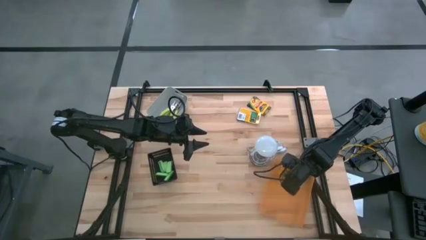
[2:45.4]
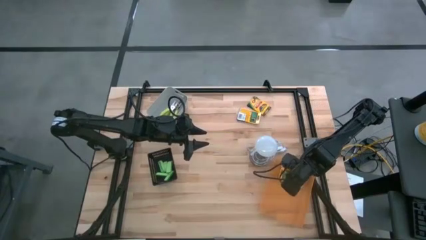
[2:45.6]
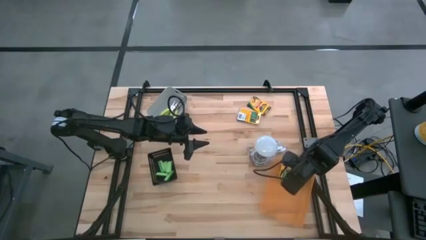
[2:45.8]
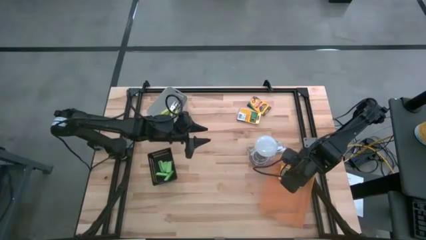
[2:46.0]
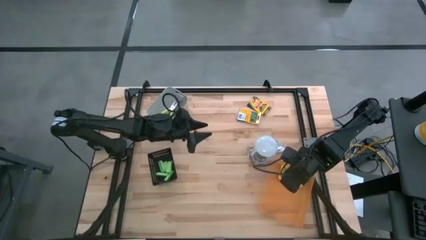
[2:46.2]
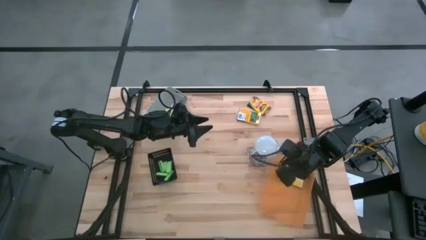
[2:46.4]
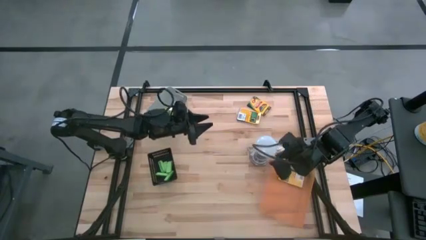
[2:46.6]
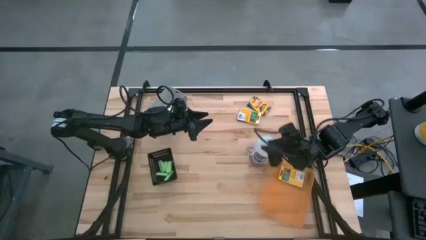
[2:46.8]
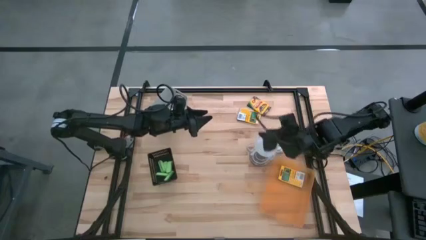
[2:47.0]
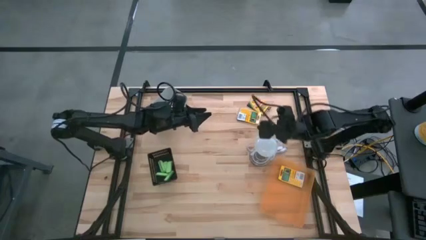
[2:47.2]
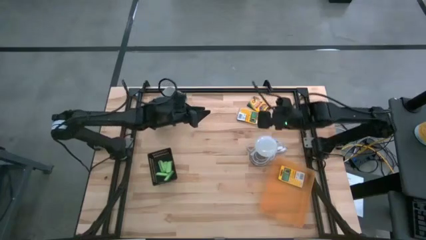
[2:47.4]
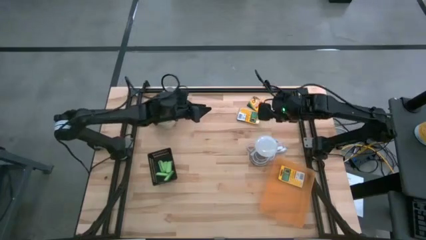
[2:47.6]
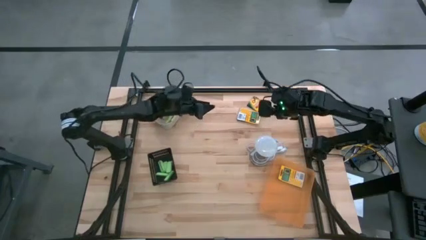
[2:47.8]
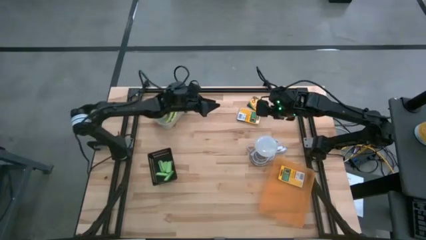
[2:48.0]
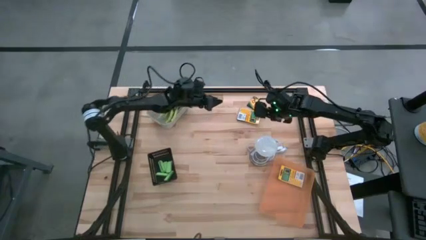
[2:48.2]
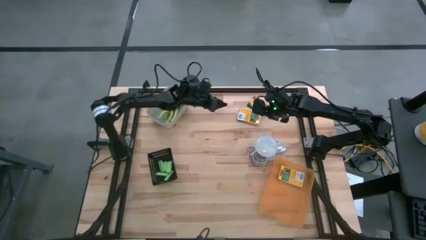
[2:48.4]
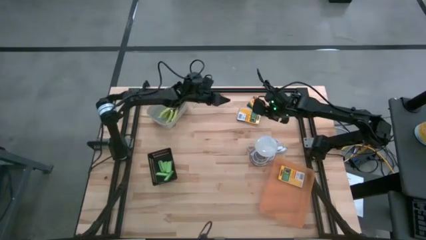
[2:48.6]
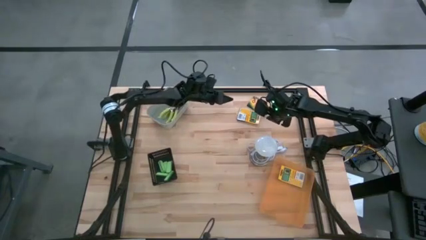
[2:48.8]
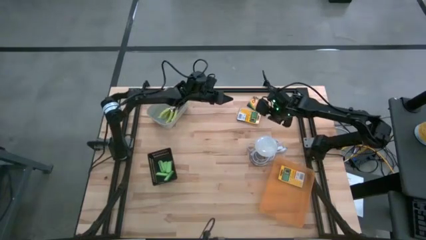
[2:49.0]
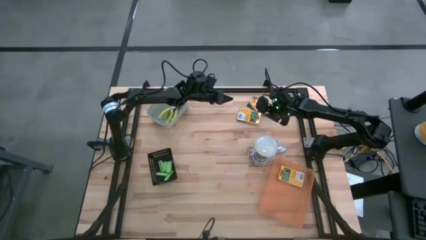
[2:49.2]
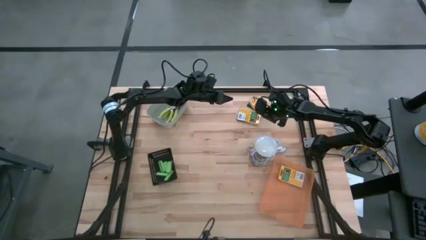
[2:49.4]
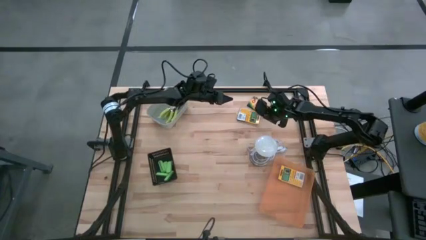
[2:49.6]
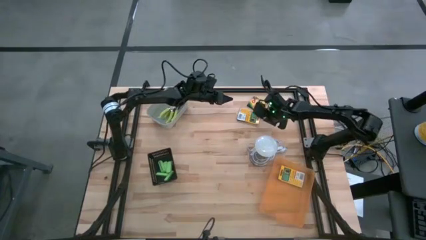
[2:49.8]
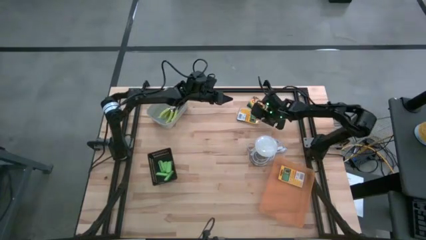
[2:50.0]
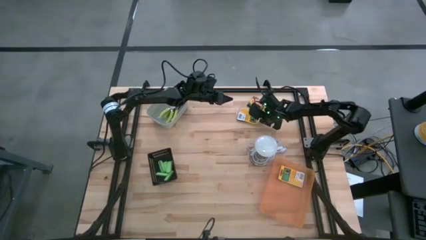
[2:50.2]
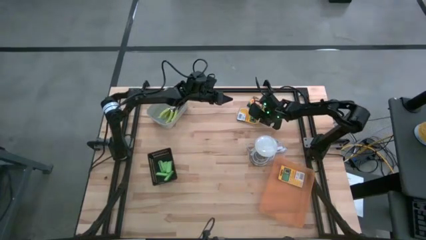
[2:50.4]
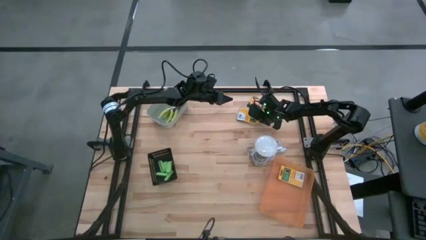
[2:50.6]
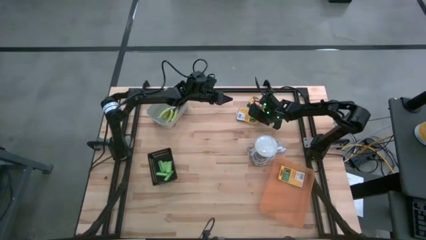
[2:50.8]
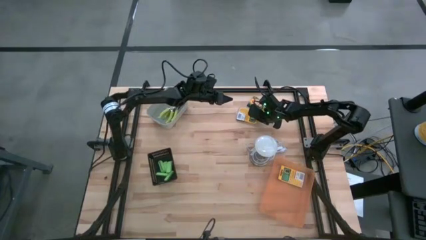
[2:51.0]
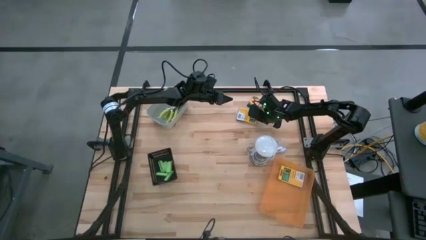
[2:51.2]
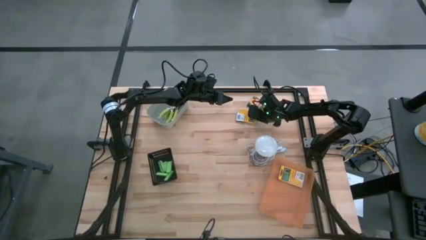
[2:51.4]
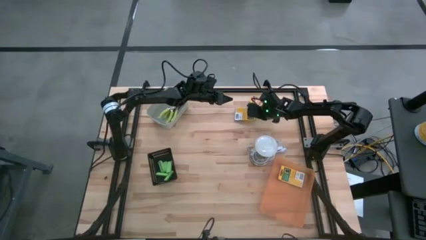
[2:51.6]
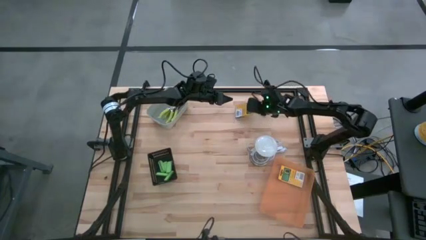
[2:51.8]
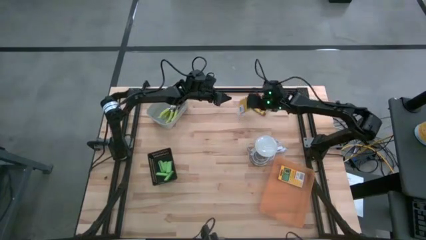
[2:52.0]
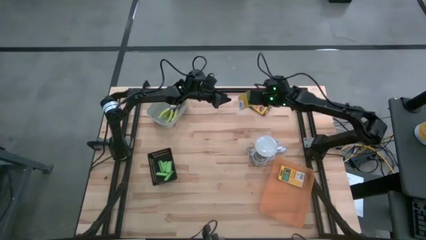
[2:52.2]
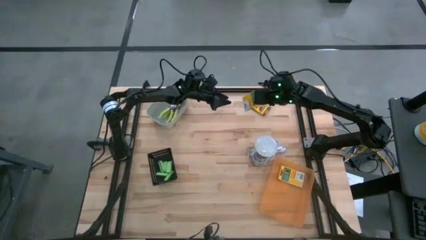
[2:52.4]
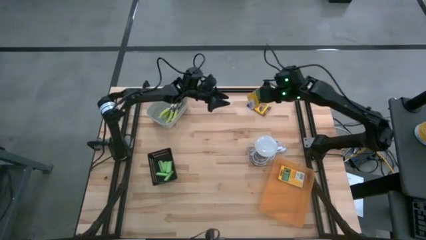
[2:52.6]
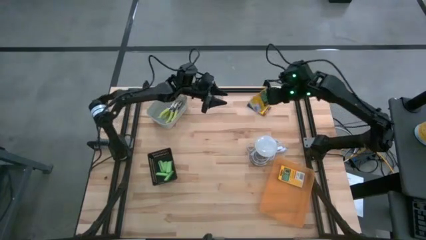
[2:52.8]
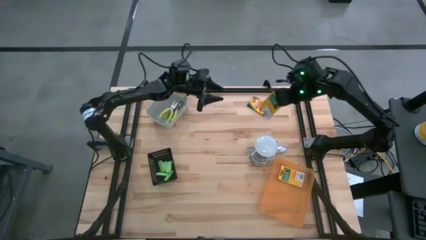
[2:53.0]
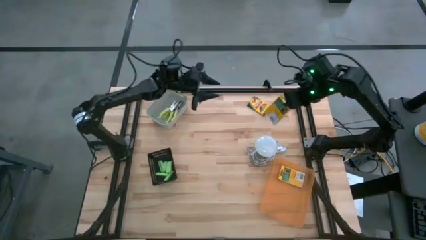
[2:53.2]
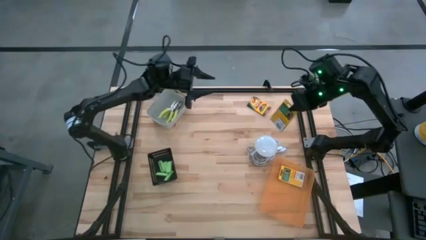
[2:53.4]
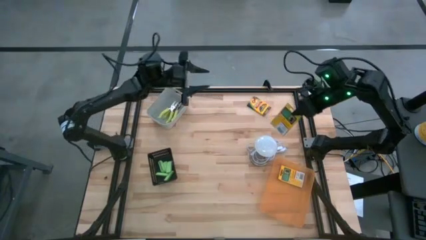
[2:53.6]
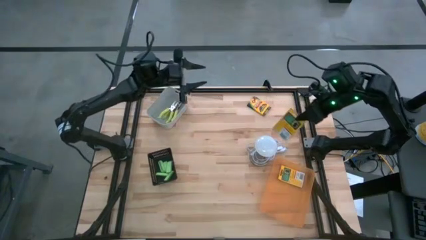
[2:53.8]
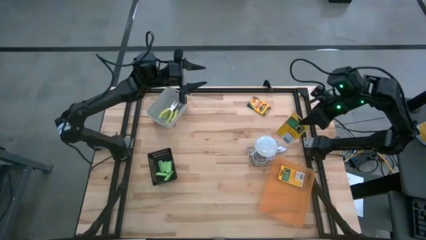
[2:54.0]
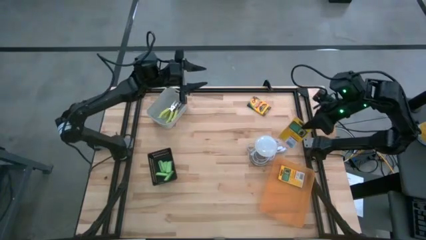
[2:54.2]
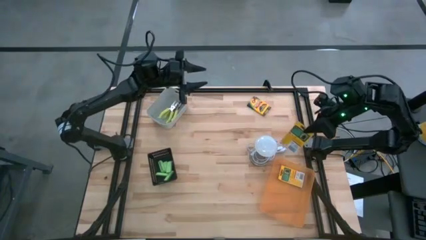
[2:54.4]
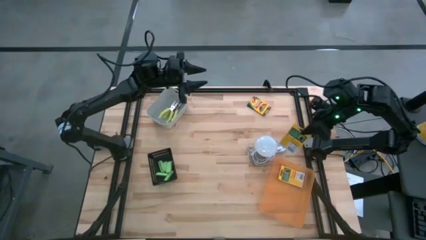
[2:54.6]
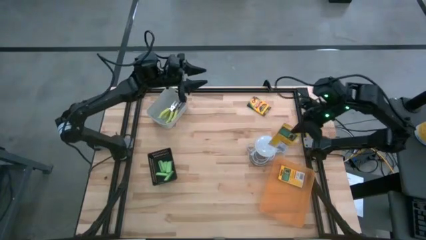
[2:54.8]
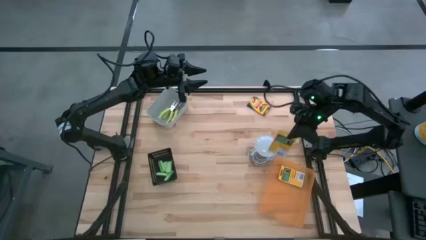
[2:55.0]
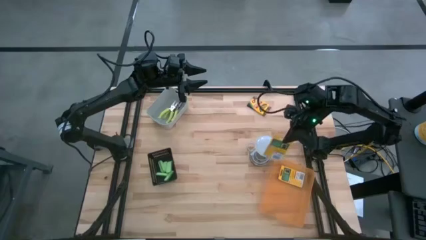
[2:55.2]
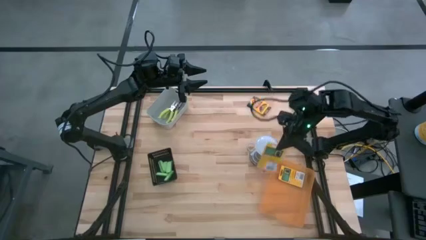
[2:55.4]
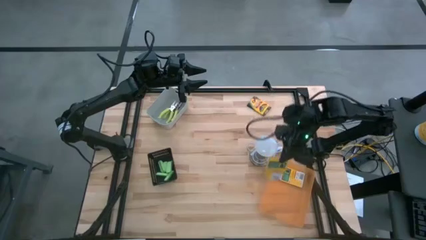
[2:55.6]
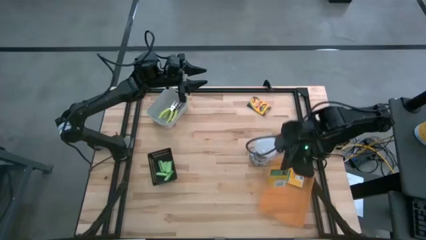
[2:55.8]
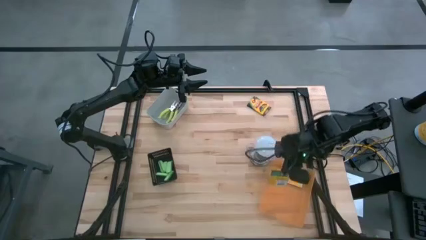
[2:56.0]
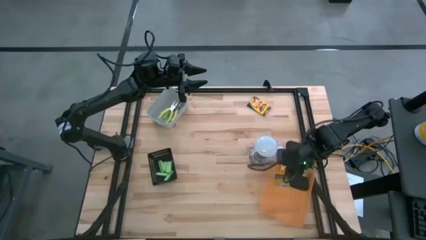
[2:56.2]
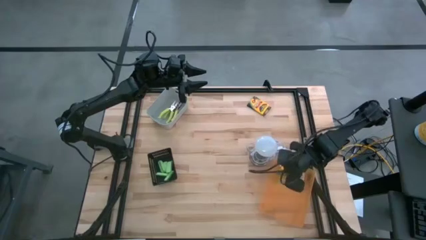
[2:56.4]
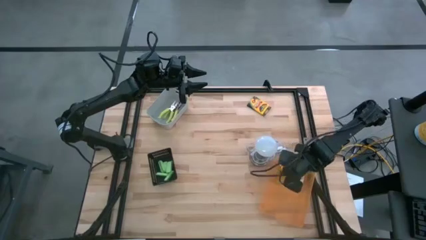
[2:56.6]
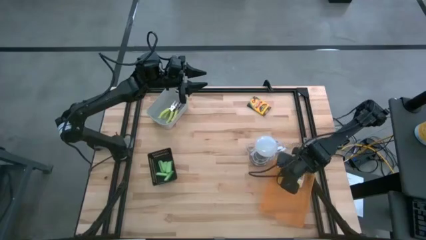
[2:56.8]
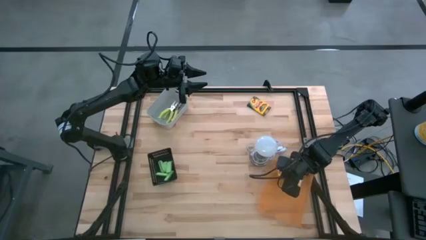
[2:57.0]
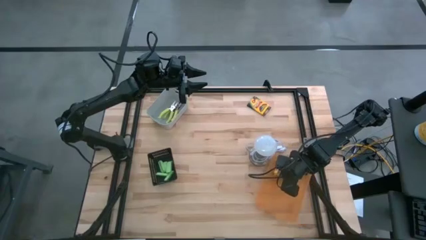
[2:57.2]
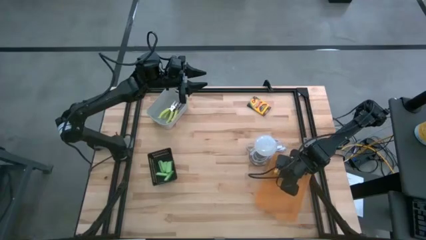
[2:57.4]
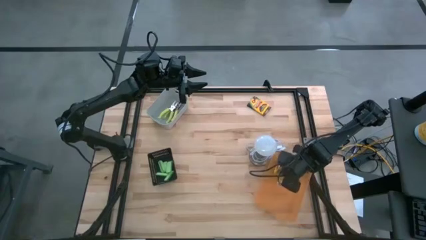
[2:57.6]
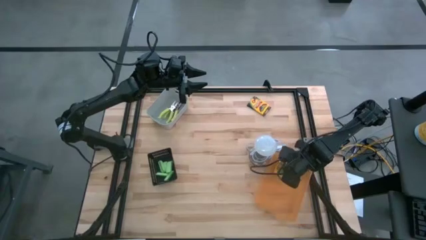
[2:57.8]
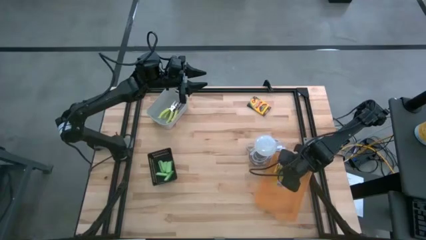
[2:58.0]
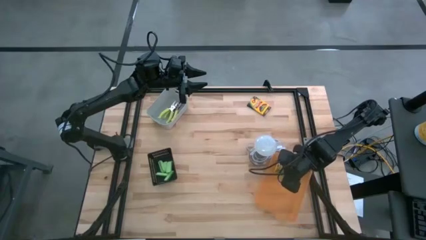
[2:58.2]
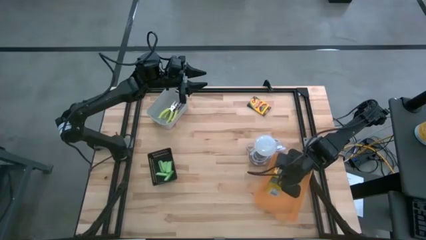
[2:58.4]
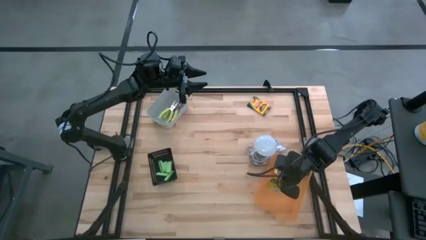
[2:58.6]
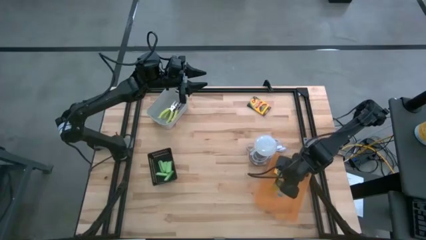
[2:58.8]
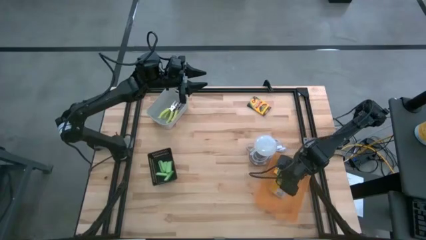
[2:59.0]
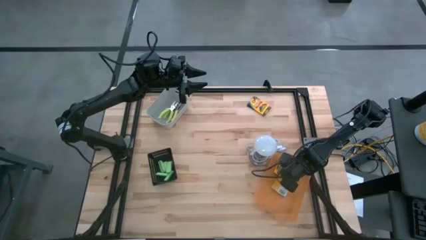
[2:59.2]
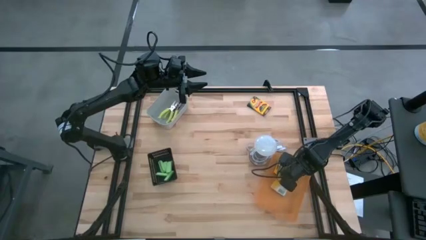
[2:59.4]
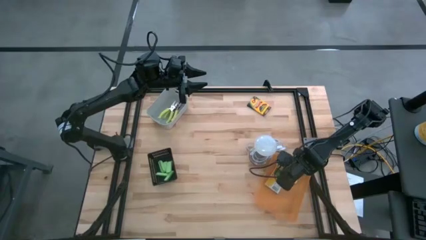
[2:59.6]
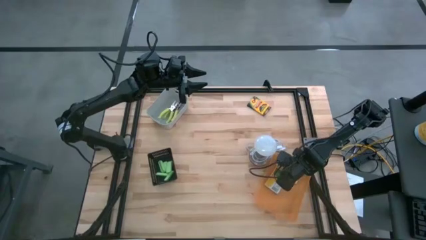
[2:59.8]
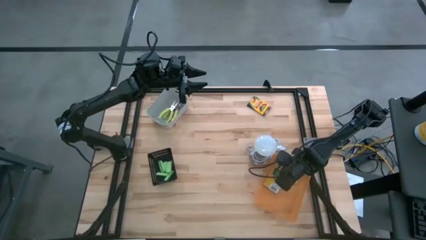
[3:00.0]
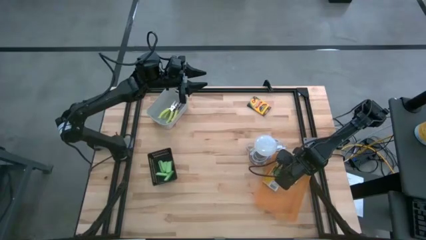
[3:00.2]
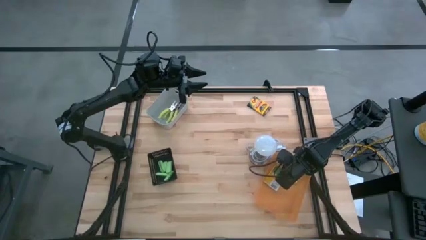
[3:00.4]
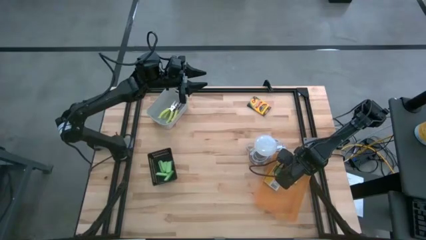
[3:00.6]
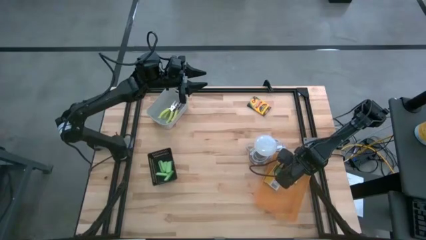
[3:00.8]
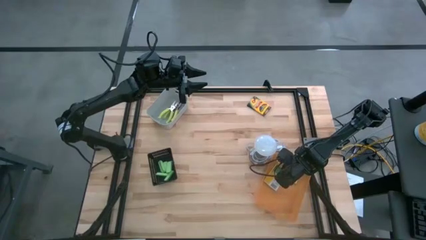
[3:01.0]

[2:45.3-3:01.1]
Task: Pick & Place School Supplies
Put the yellow yellow crayon box into the orange bin

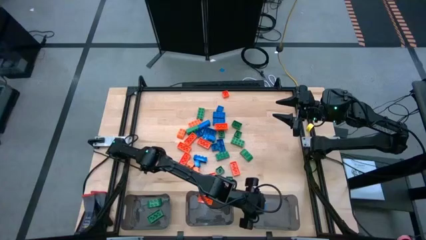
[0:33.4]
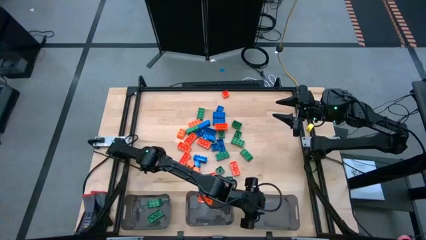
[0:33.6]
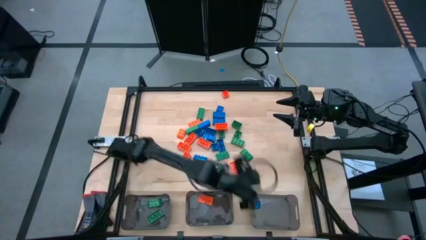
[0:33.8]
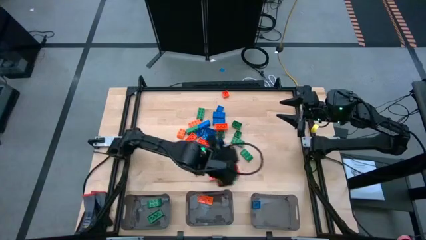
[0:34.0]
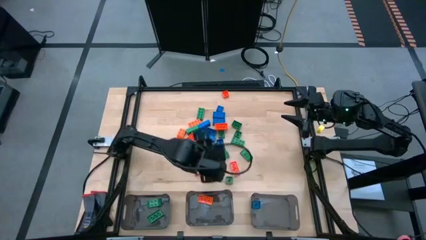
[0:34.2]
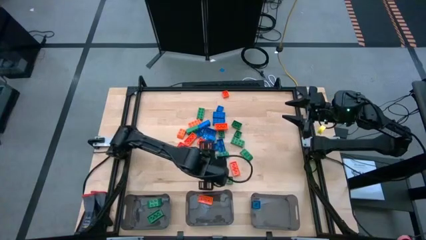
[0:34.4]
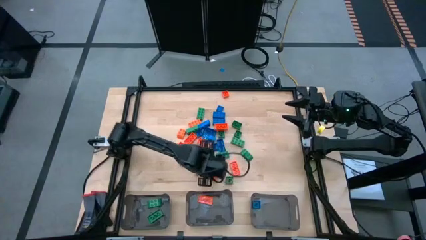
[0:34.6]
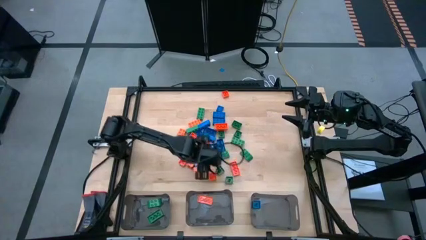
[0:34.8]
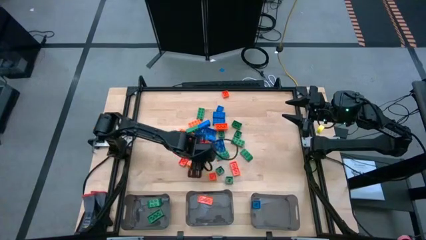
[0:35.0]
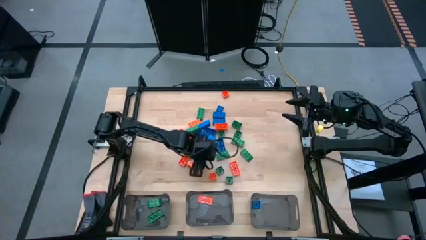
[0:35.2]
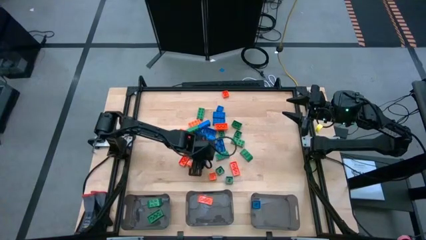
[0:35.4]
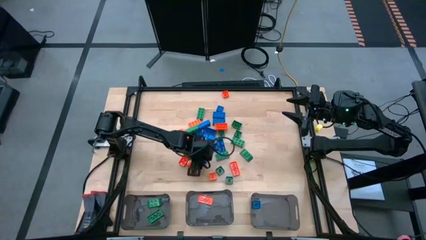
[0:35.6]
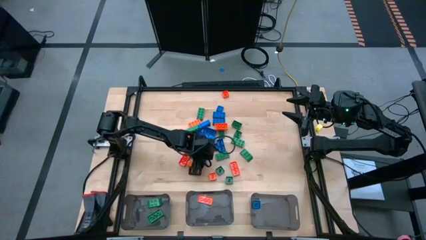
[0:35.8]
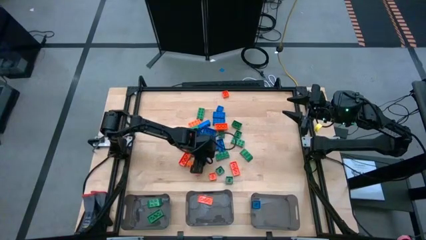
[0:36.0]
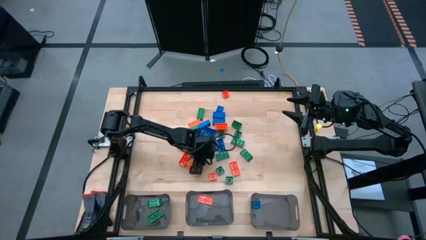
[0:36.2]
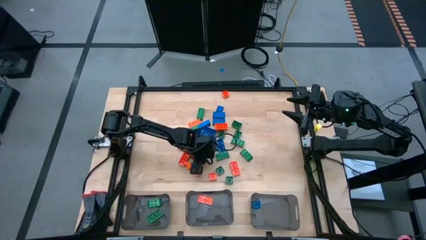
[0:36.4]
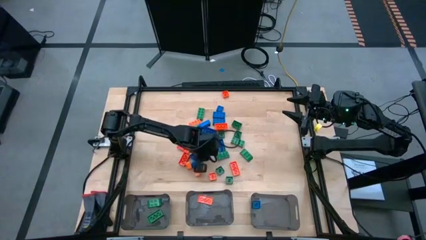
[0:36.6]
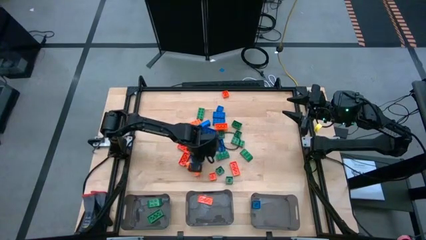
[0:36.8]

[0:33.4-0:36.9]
Task: Sort blocks
Put the blue game piece into the right black bin
